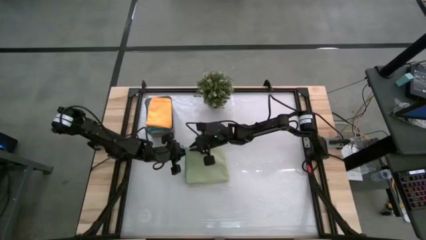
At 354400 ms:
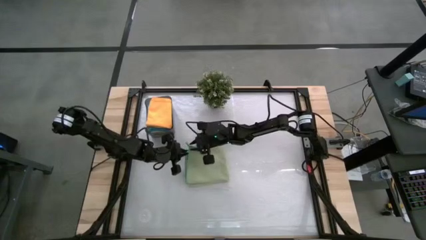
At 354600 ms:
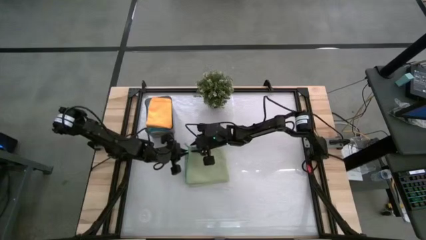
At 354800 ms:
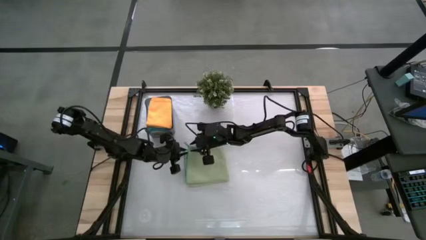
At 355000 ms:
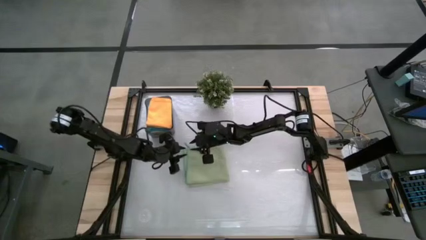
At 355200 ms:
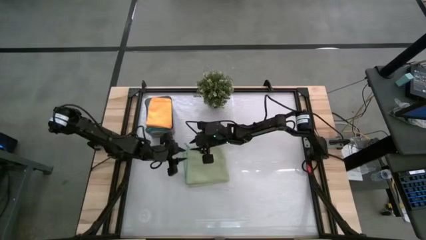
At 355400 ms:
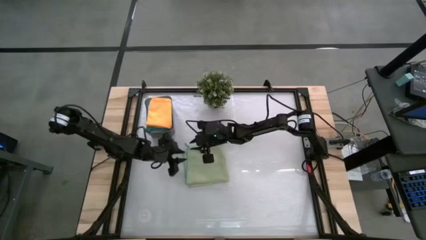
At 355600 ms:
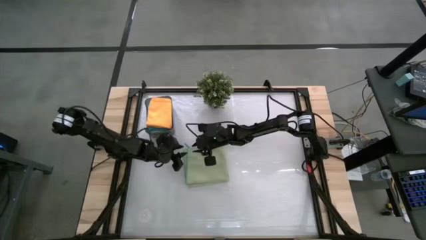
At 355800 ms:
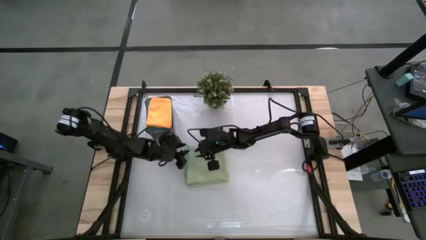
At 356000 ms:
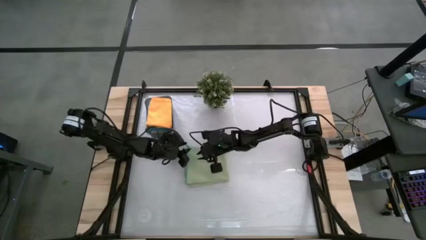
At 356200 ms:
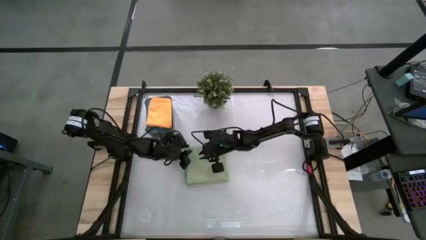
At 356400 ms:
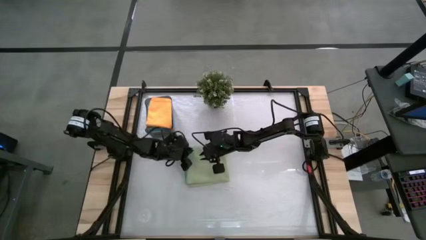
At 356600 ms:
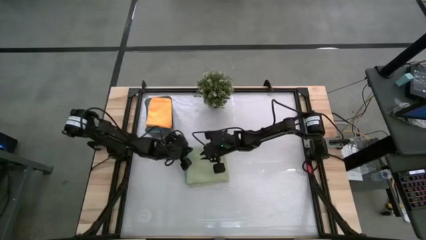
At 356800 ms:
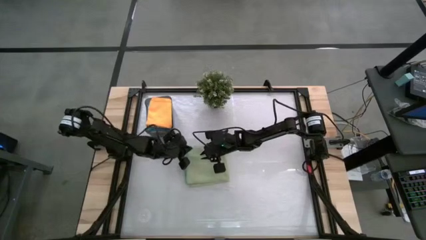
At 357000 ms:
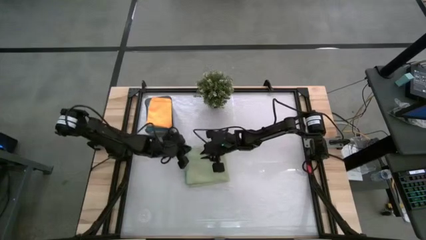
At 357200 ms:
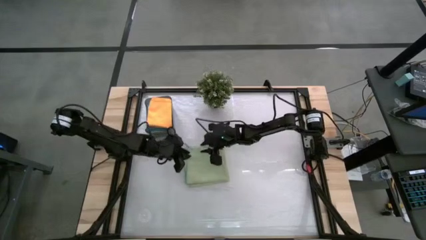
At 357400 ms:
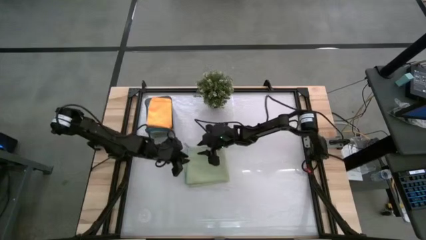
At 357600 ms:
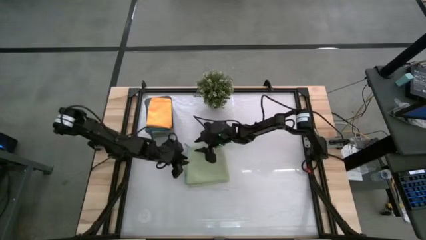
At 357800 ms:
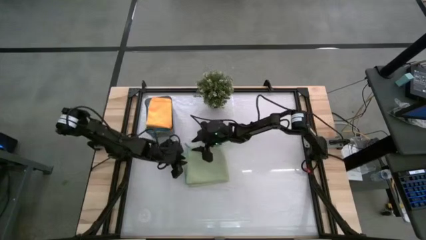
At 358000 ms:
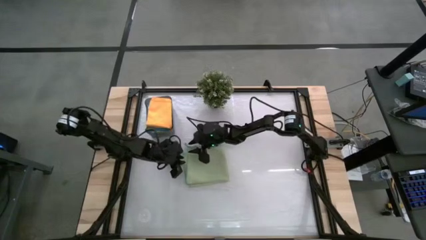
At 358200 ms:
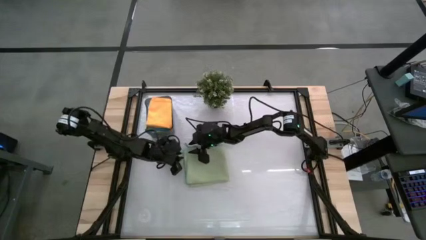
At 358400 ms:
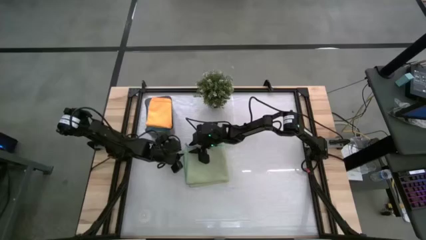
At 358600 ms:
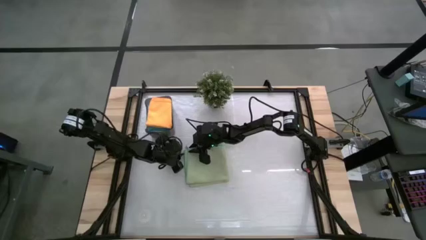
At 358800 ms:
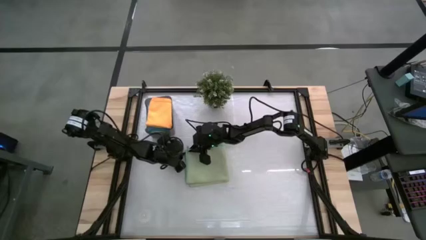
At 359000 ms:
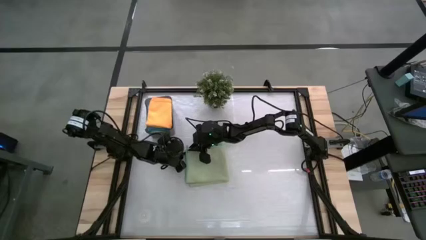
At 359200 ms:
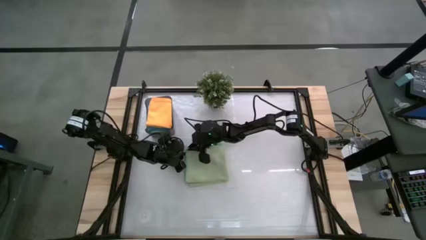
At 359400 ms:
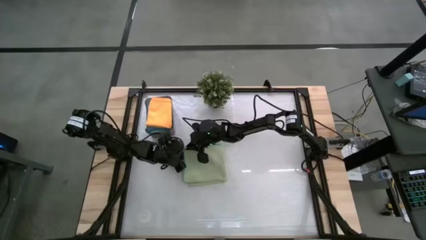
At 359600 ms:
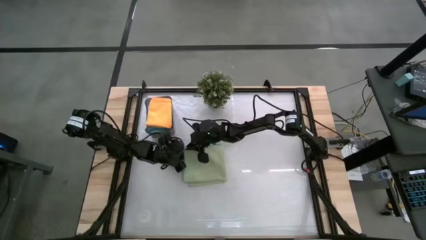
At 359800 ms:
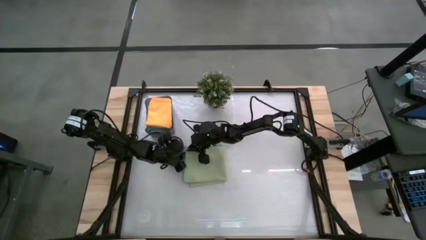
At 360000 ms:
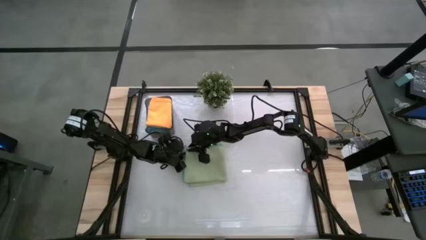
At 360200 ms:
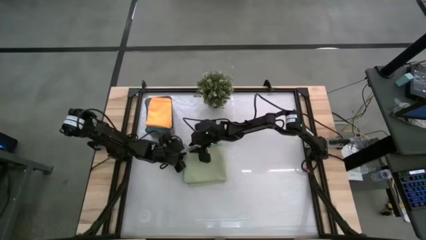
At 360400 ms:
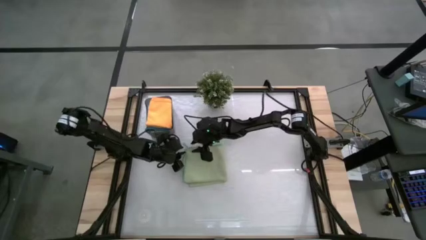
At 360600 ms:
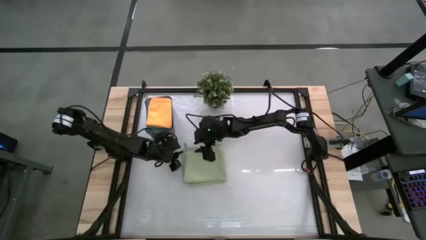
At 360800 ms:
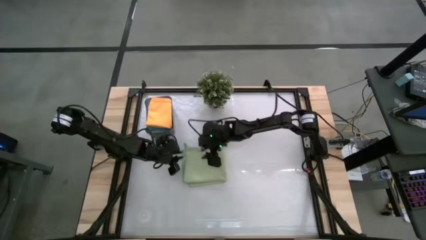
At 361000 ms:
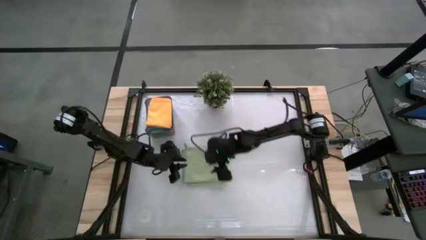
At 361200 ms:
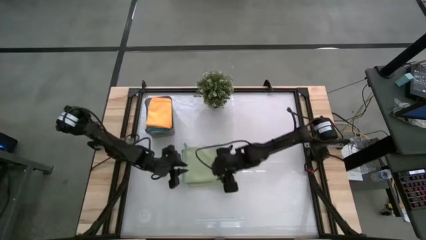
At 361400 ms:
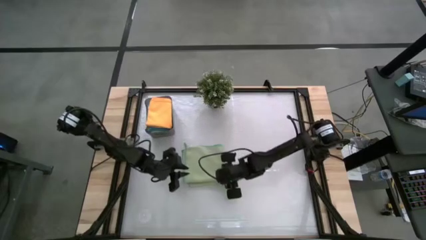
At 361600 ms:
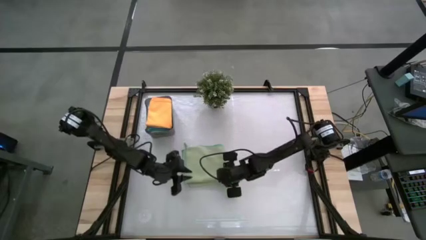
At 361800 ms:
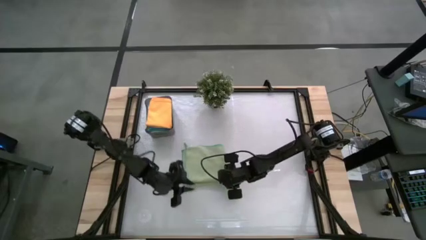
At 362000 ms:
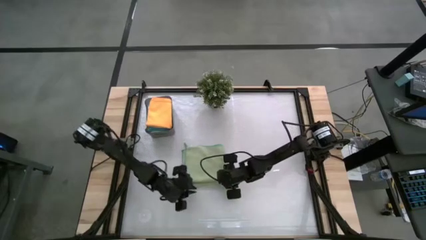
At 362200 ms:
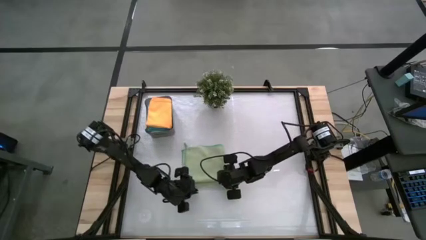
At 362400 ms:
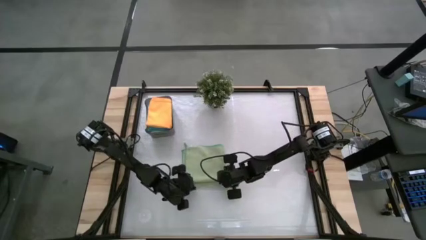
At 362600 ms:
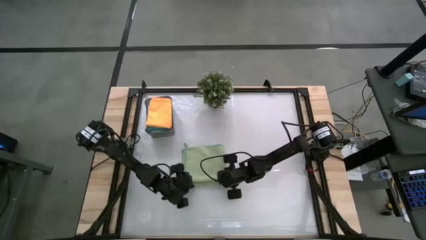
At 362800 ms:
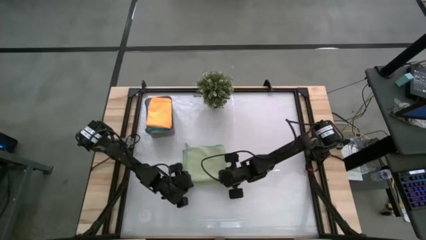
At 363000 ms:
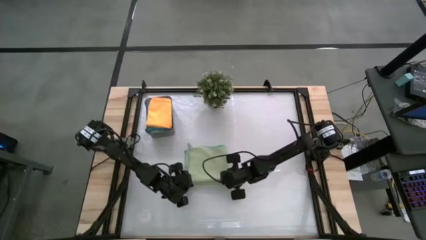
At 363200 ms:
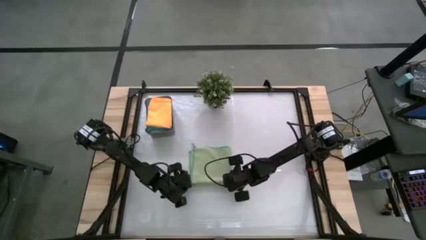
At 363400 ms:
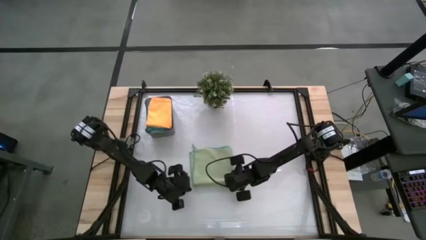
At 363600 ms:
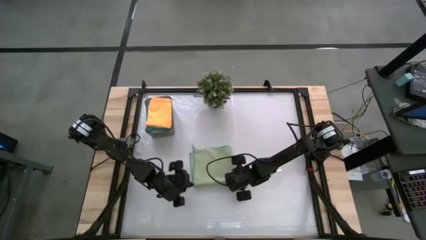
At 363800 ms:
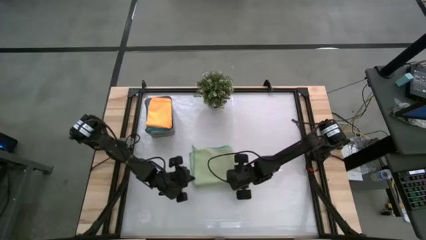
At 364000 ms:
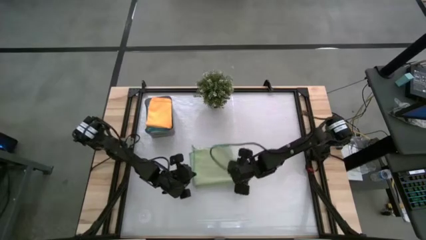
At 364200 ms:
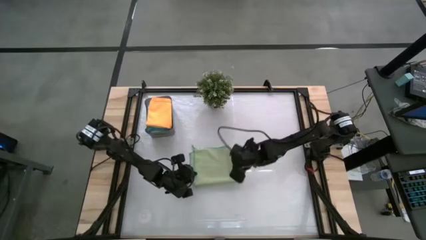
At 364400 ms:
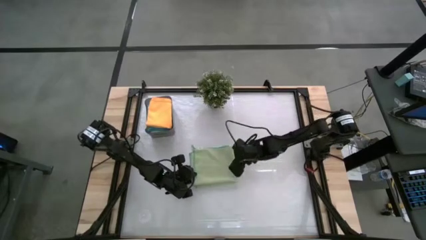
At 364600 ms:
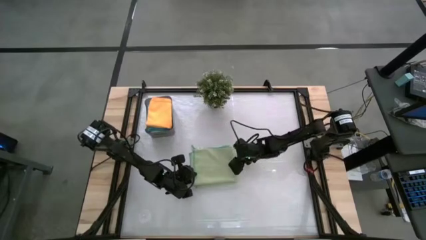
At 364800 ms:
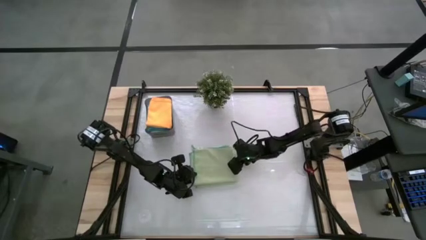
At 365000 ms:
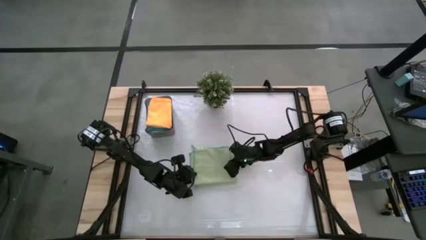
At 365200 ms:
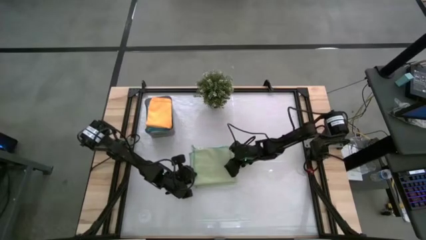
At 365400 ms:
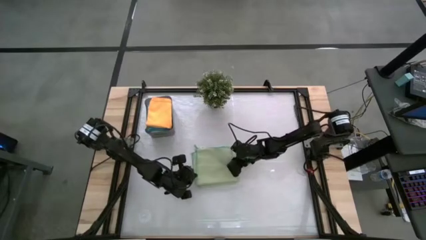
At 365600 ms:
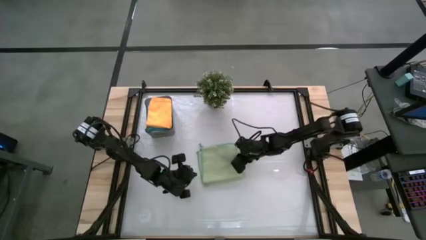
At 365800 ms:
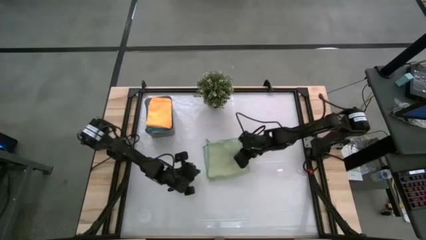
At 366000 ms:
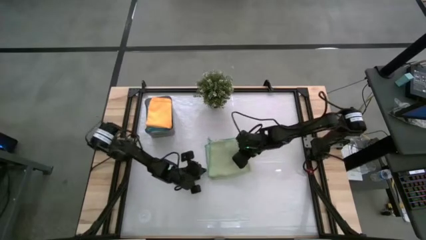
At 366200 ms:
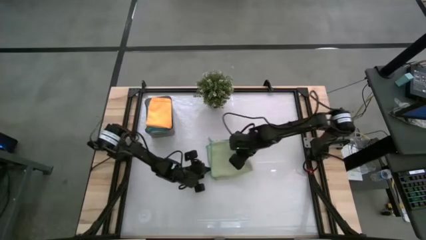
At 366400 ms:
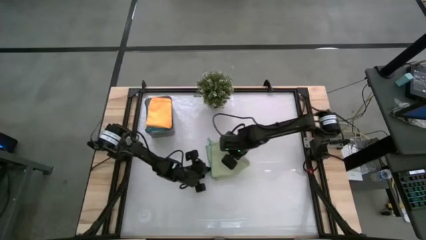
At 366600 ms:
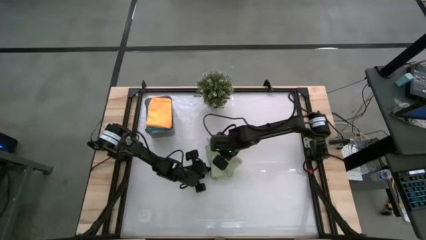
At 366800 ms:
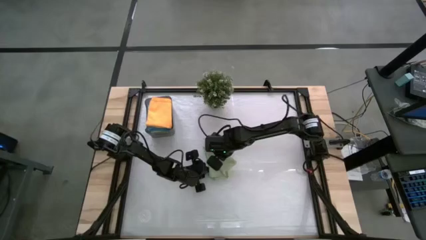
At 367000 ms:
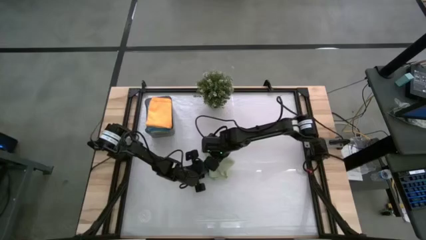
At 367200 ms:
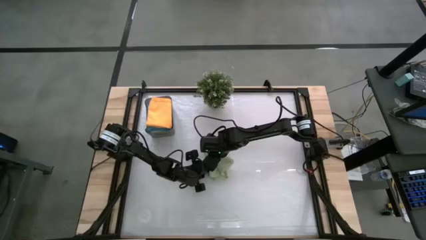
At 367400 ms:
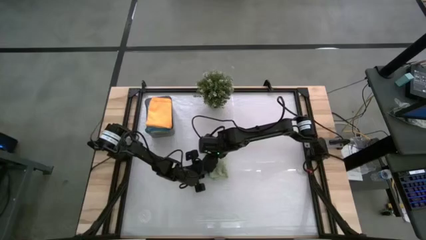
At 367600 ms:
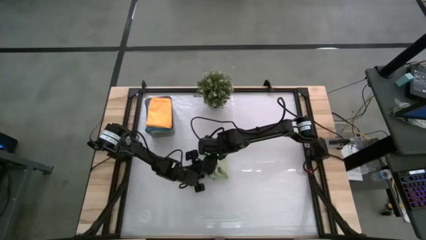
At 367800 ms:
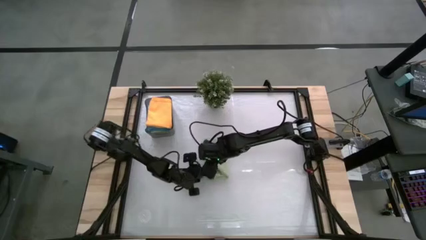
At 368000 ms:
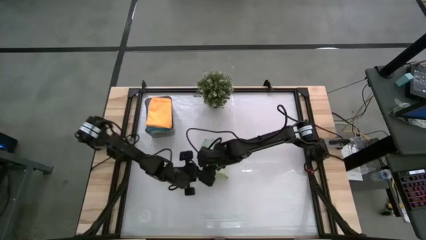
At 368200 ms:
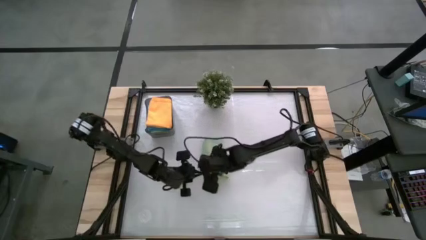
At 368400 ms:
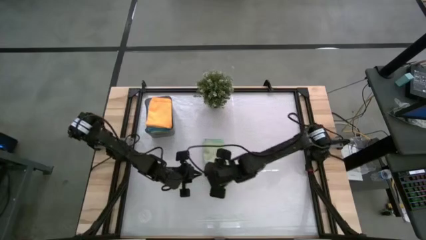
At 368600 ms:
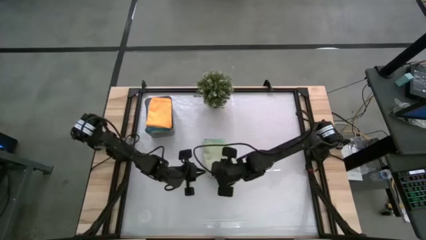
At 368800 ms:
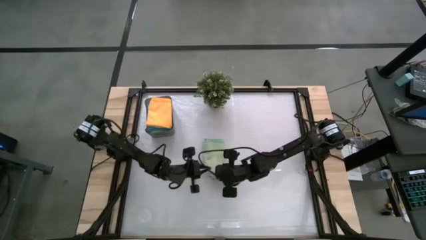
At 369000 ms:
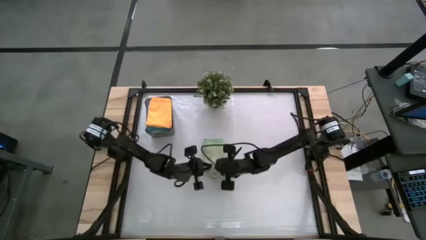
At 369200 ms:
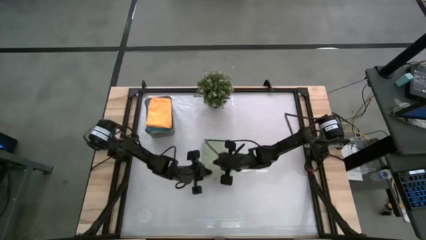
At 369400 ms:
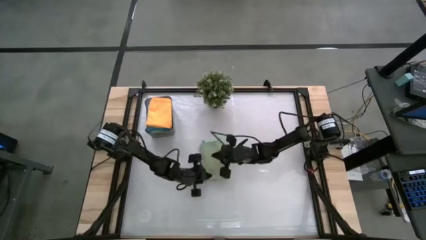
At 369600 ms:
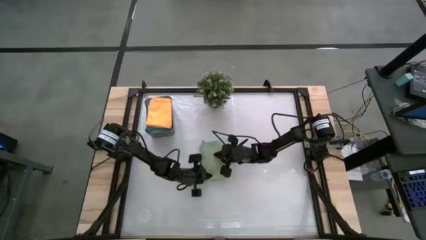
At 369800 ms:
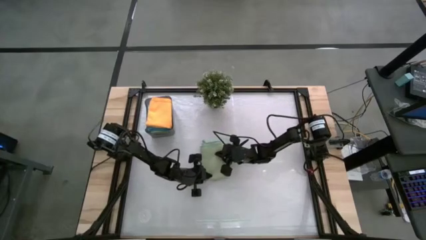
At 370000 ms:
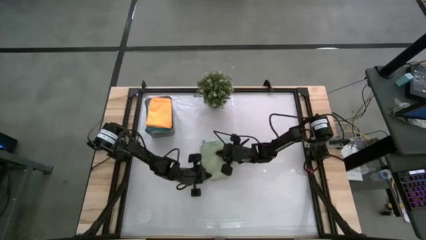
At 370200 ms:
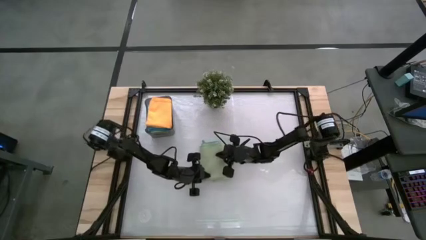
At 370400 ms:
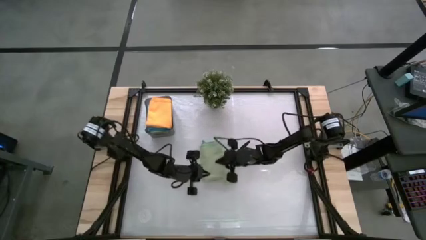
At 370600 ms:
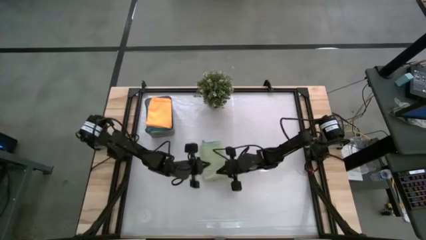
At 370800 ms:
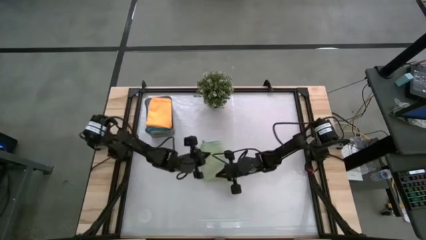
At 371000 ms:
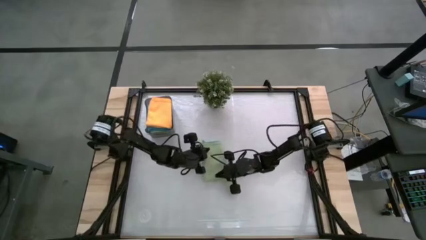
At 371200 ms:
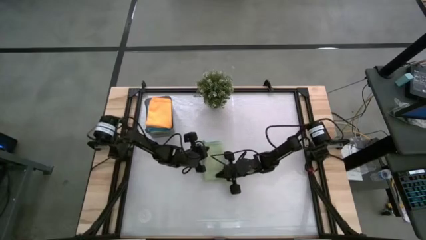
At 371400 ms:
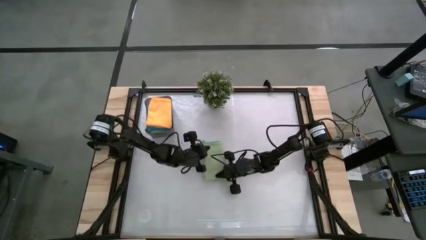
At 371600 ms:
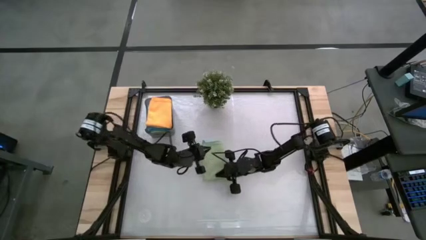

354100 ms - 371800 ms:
Task: Fold microfiber towels
Fold the green microfiber cloth
